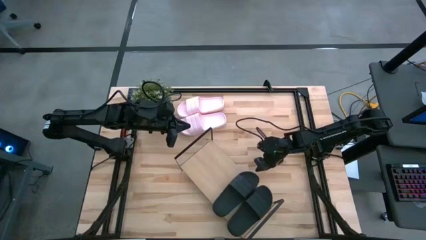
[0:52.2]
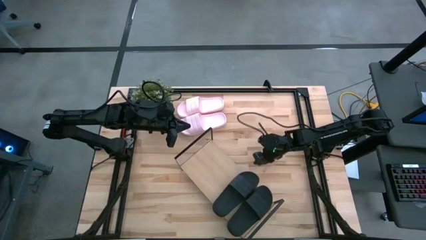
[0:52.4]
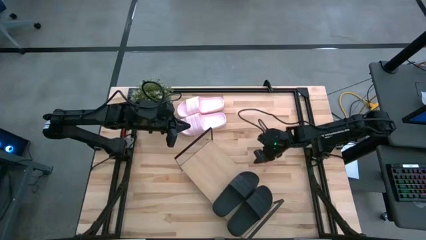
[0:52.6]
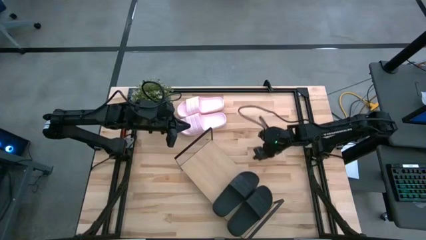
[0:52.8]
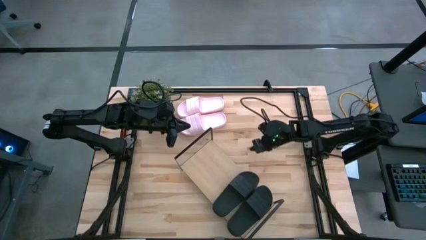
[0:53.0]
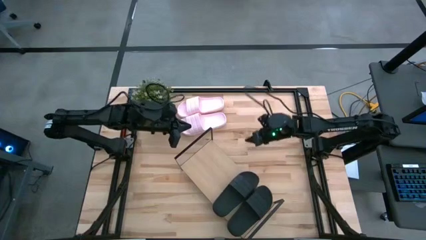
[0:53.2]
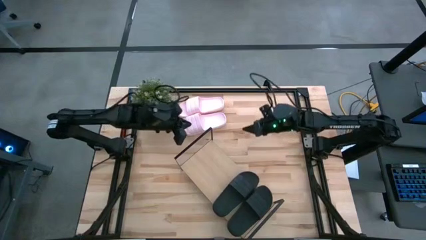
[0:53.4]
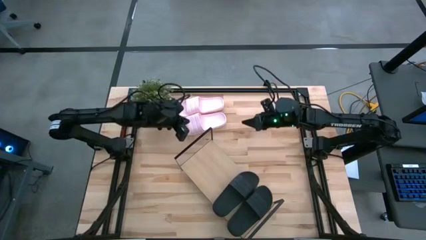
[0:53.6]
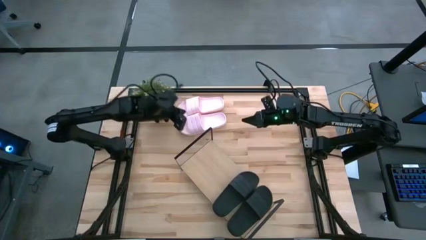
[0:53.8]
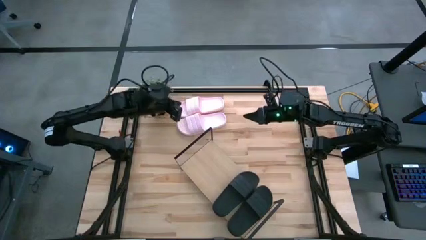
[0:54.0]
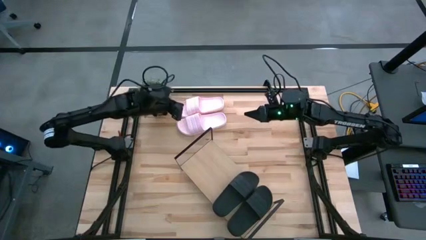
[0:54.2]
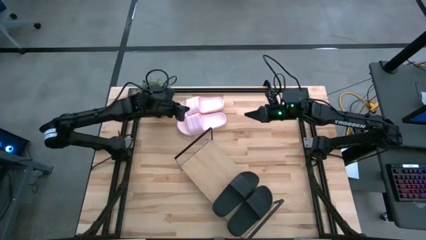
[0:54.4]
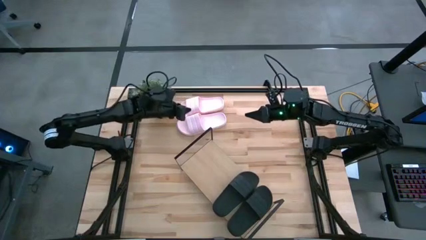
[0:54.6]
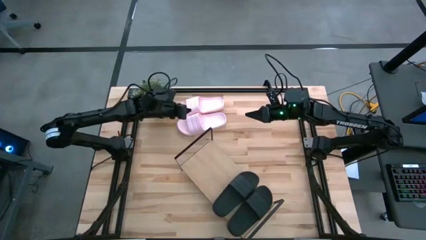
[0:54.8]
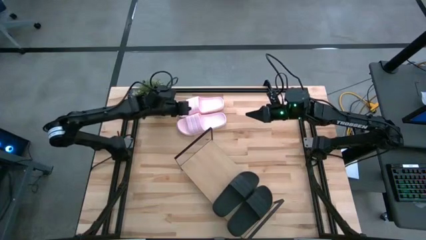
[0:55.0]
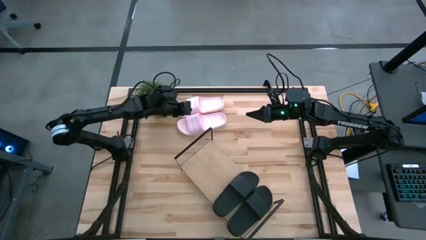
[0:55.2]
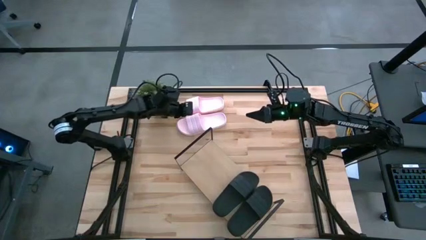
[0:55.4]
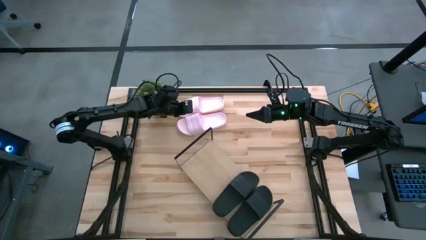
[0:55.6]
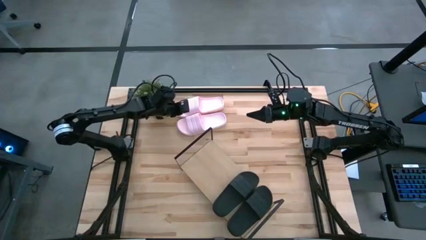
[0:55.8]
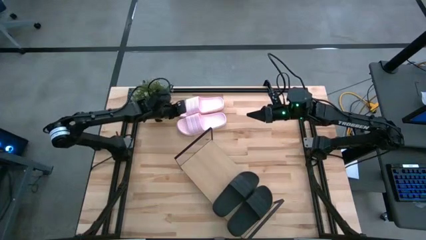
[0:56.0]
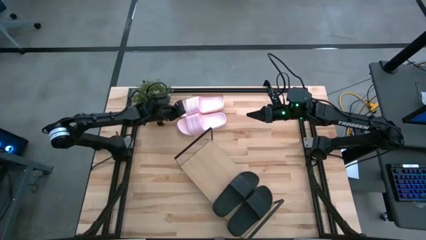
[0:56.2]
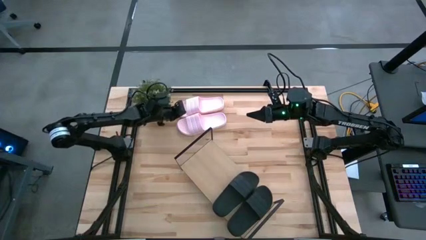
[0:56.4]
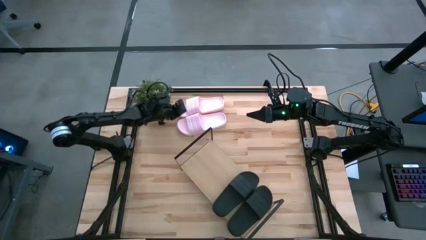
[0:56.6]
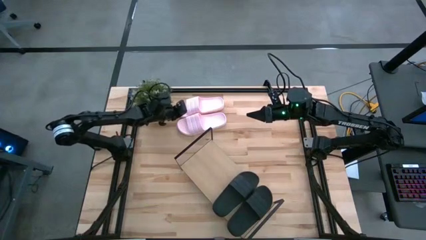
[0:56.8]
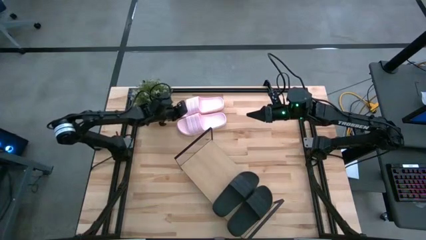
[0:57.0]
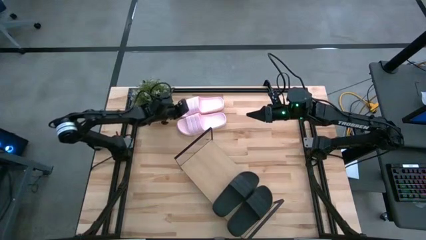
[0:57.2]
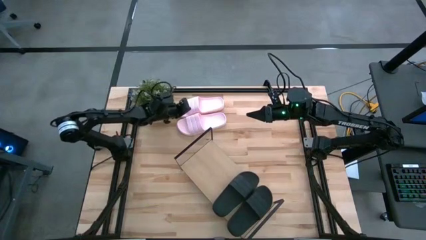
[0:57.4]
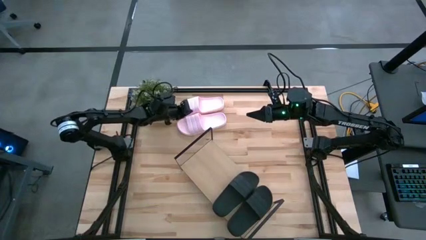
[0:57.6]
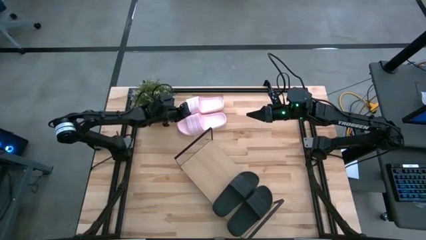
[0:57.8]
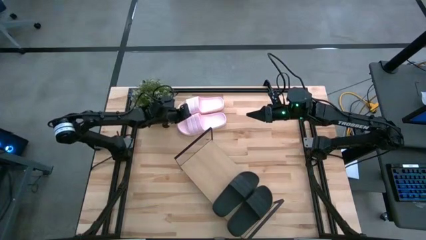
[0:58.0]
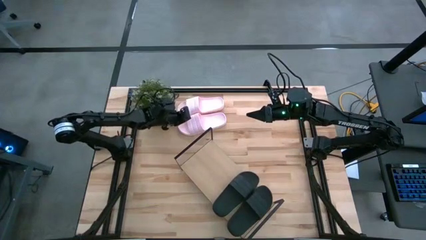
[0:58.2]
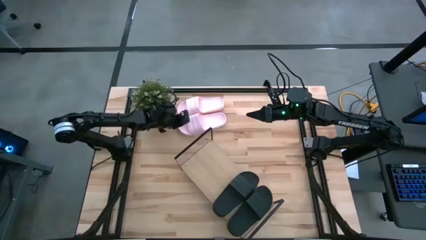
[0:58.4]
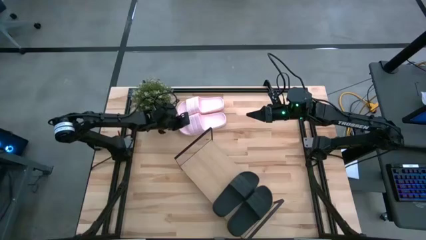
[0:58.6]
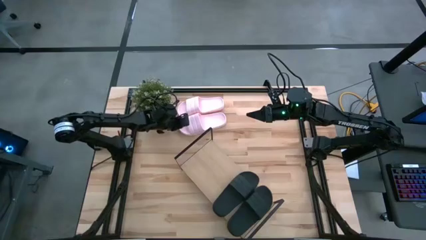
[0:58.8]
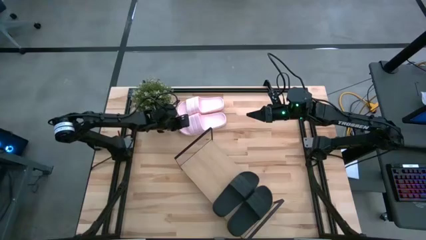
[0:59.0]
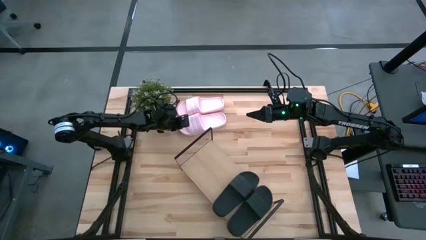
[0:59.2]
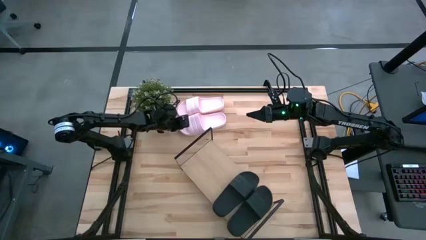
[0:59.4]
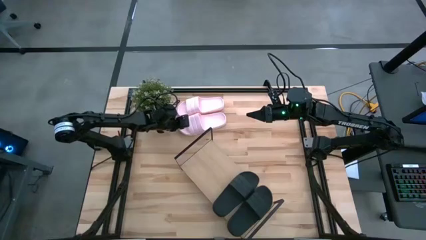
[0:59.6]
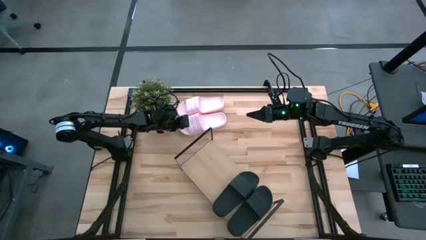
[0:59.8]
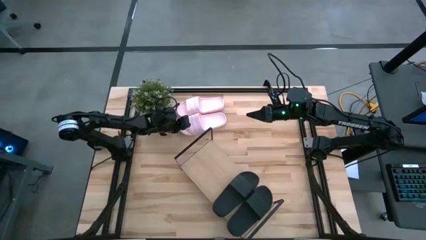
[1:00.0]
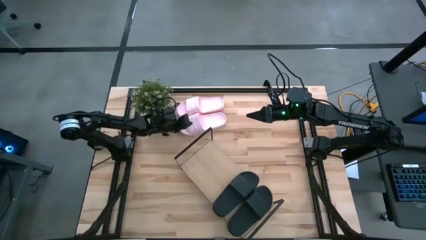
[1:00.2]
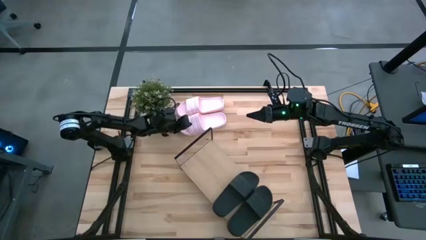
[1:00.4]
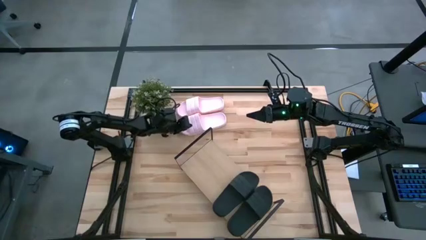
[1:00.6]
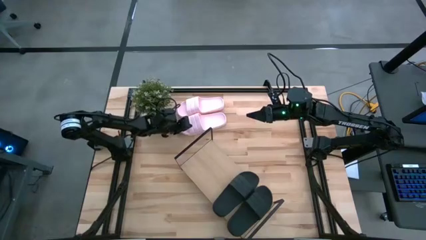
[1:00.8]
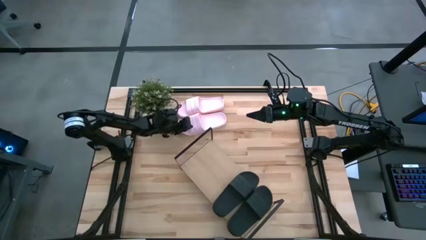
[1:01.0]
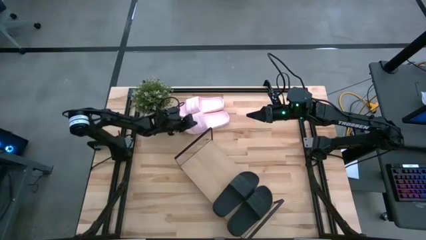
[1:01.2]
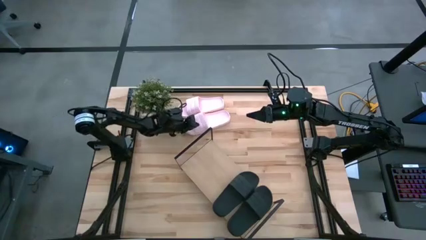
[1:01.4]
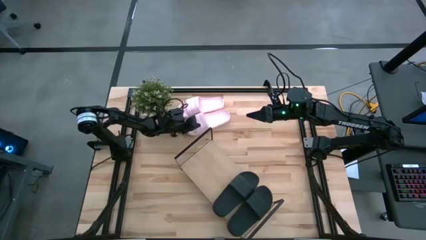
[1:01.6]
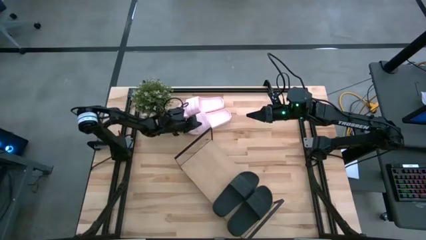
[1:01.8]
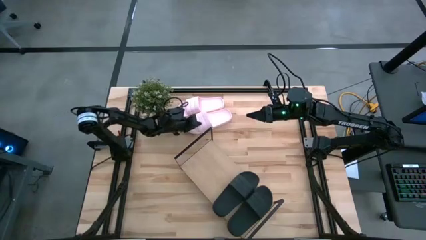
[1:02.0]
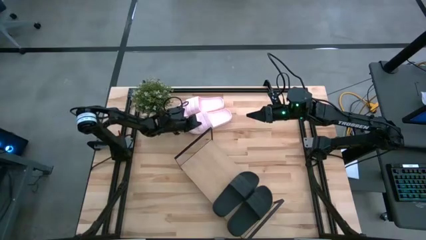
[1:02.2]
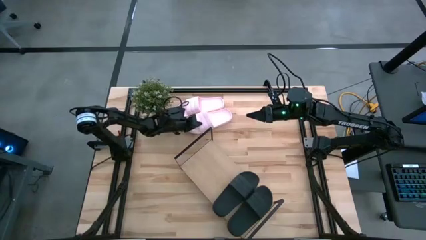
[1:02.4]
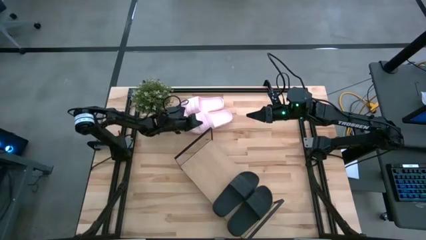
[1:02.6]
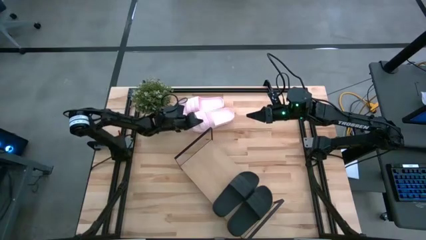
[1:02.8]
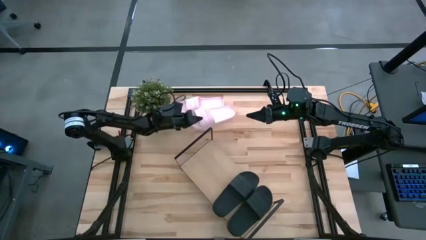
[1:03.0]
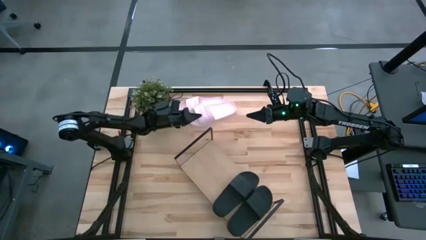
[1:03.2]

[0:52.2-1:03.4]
Task: Pick and place slides into the shelf
Put the bottom pink slipper on the shelf beside the black slipper

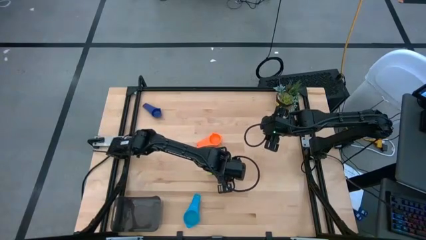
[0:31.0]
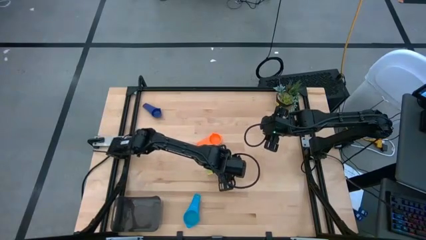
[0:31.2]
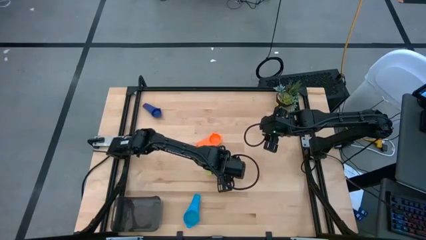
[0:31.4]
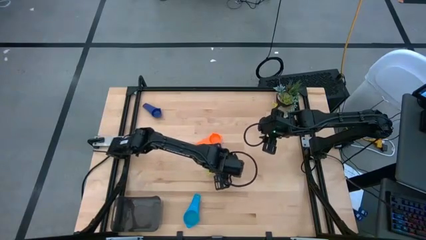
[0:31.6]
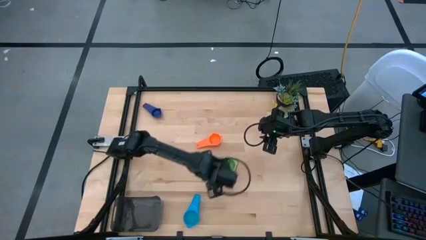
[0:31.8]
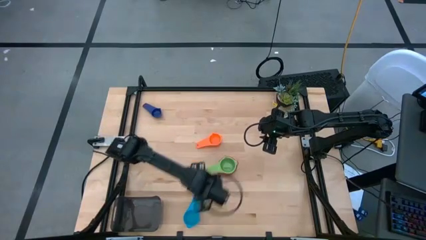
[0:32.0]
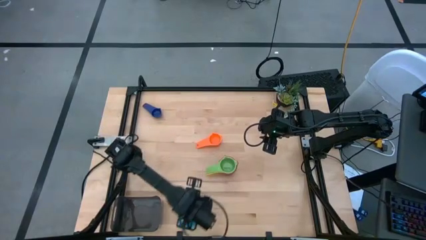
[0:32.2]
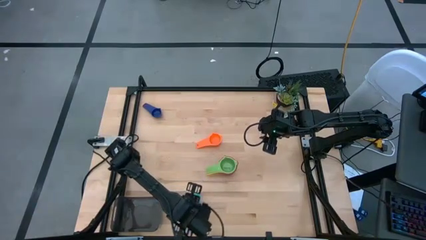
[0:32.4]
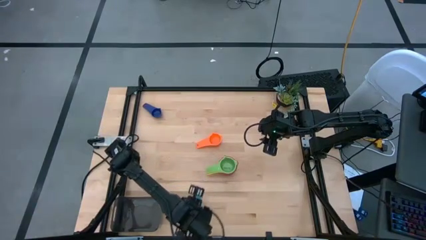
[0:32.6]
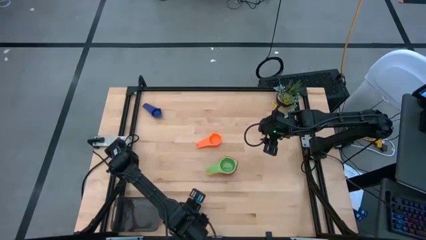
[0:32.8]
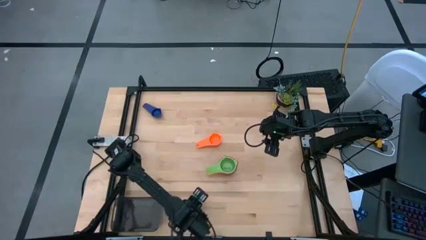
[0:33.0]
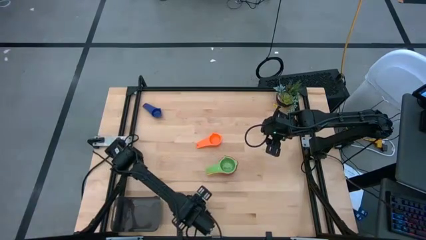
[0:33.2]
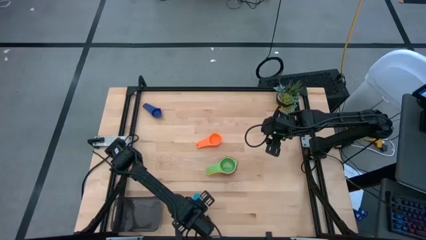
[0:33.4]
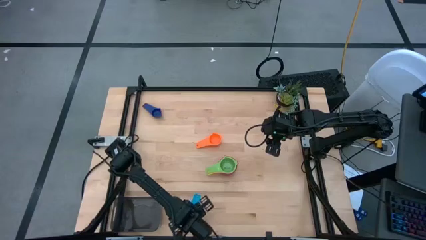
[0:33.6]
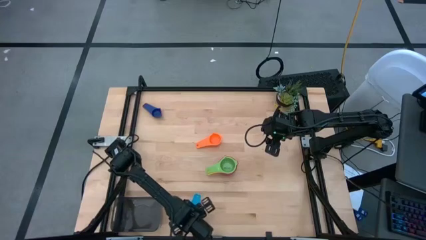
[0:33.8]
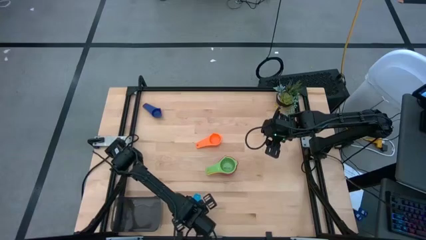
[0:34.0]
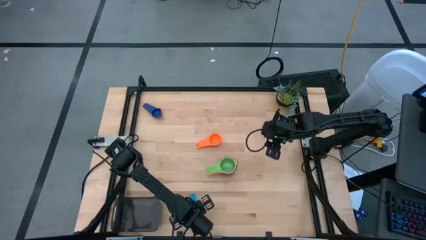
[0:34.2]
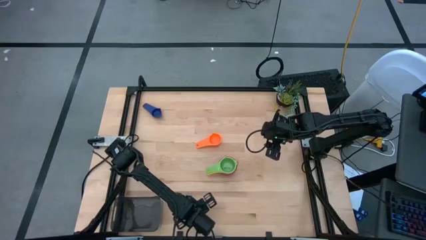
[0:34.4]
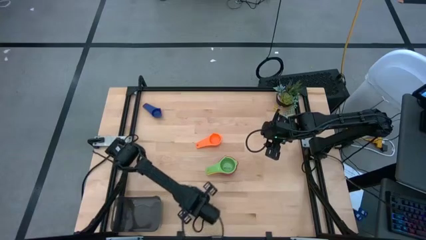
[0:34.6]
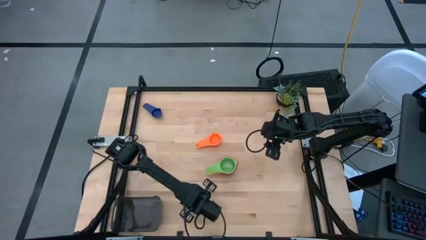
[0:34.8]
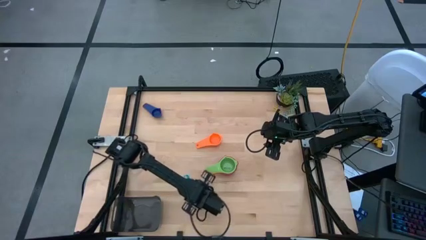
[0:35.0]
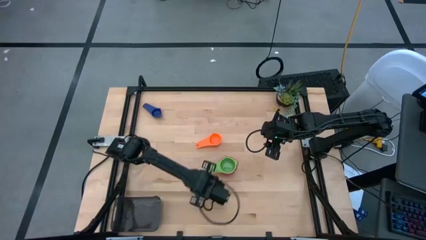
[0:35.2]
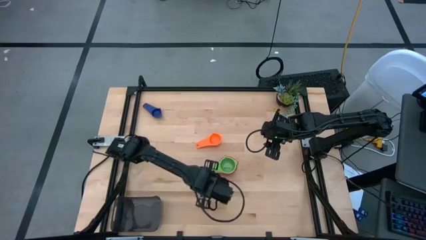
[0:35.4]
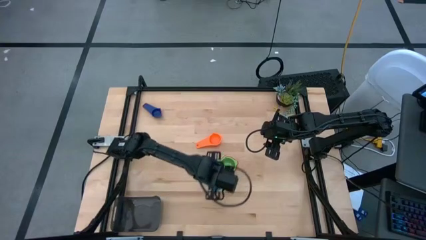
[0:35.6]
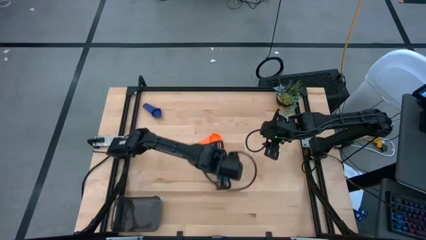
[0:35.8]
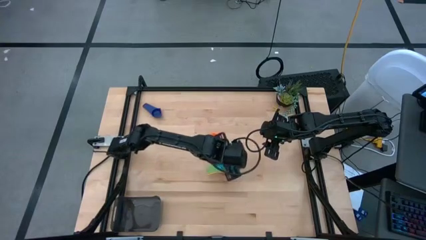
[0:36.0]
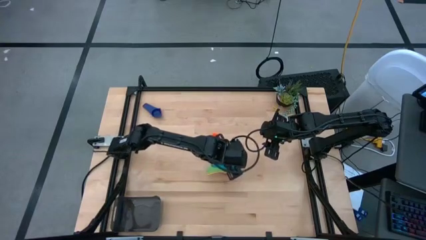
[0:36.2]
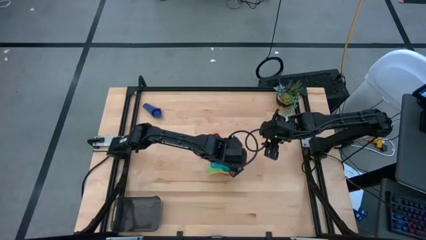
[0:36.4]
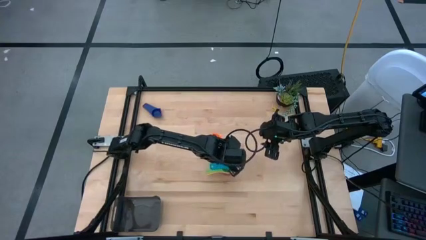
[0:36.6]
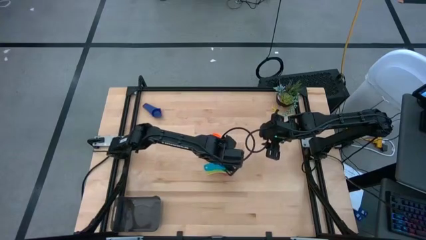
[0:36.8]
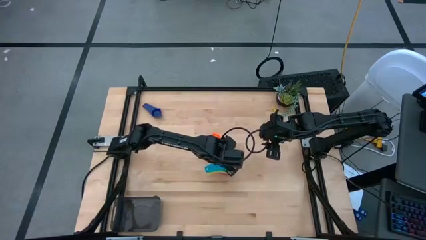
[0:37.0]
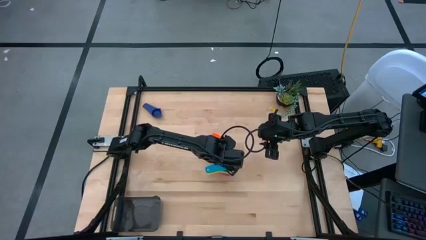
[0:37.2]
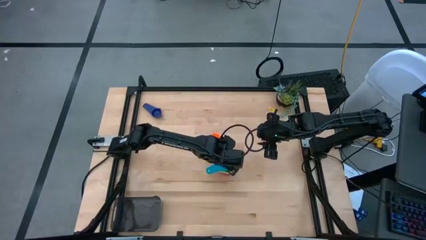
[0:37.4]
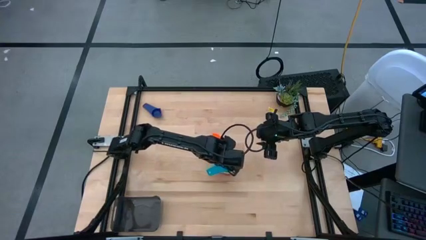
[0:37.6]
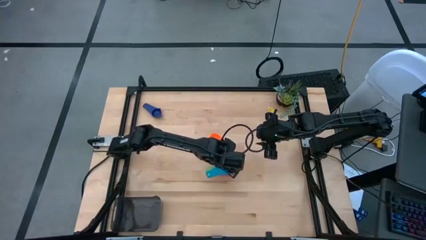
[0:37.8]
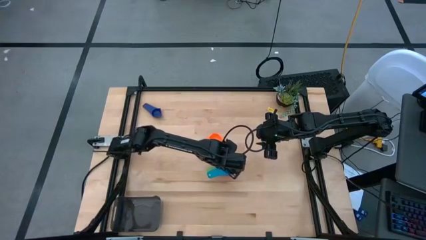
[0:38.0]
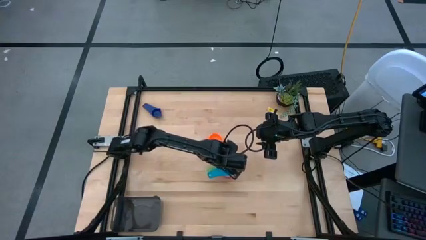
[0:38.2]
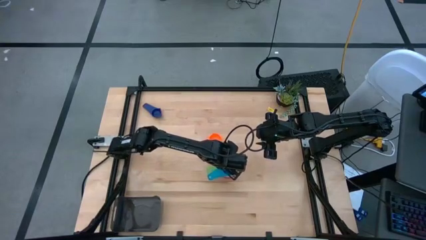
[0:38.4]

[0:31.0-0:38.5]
Task: Nest measuring cups in basket
Stack the light blue measuring cup on top of the green measuring cup
